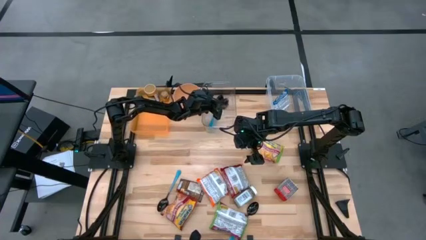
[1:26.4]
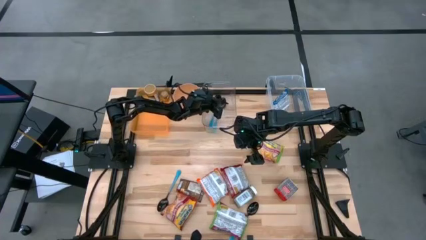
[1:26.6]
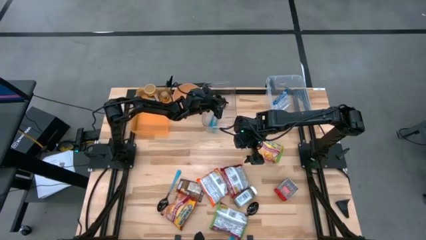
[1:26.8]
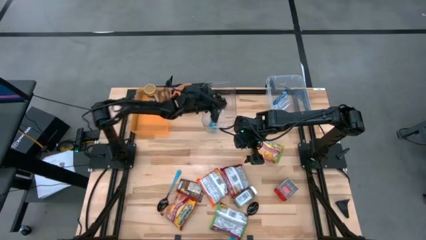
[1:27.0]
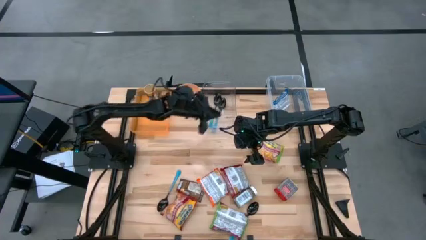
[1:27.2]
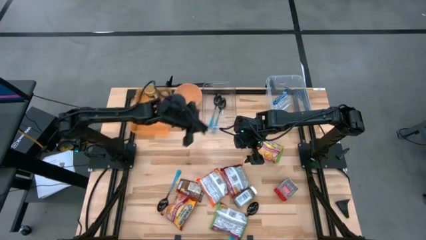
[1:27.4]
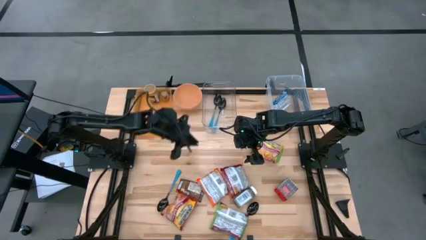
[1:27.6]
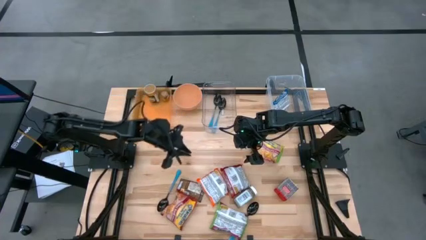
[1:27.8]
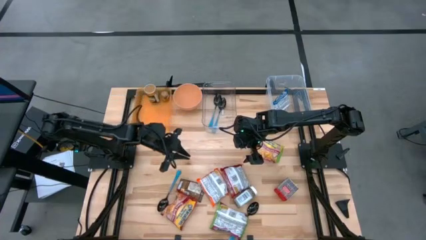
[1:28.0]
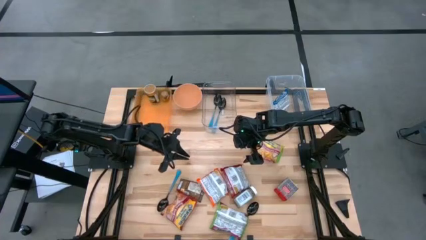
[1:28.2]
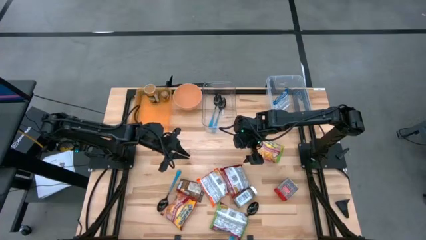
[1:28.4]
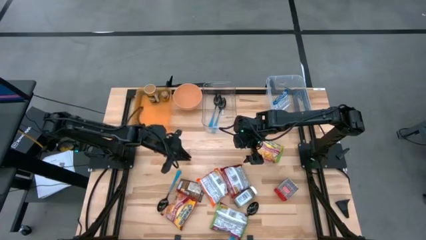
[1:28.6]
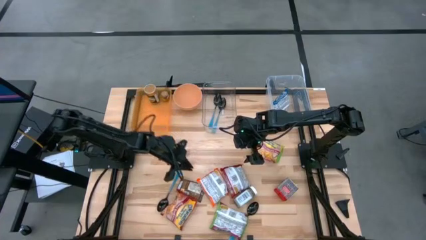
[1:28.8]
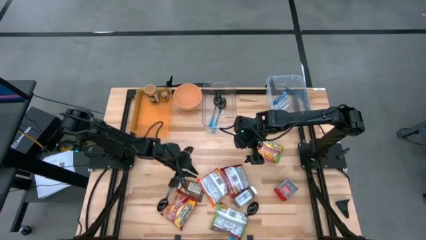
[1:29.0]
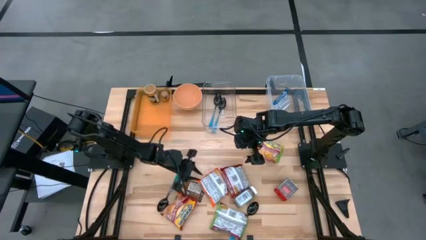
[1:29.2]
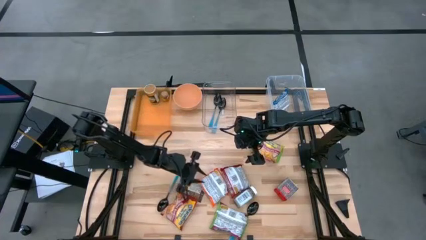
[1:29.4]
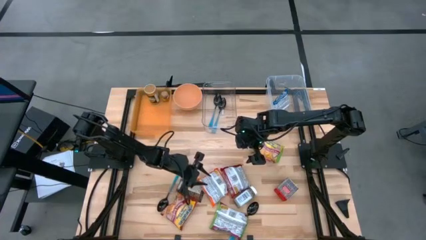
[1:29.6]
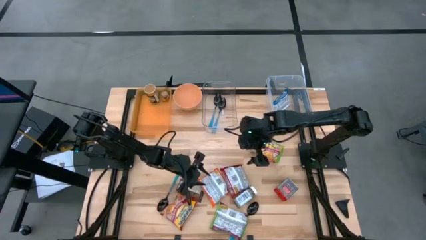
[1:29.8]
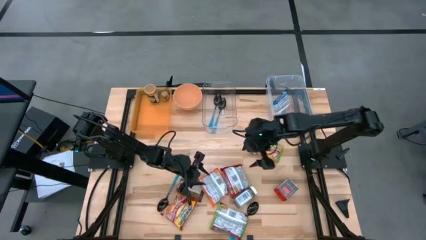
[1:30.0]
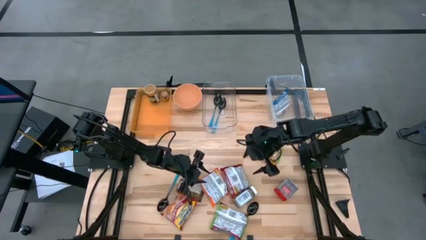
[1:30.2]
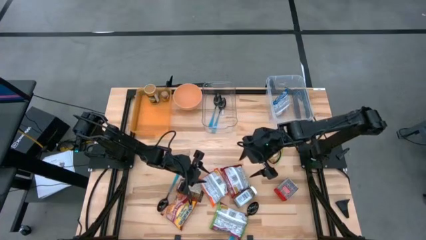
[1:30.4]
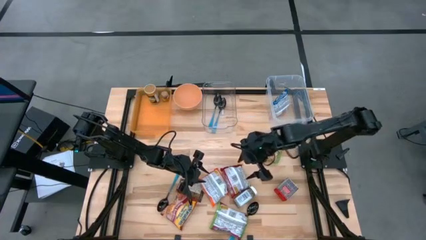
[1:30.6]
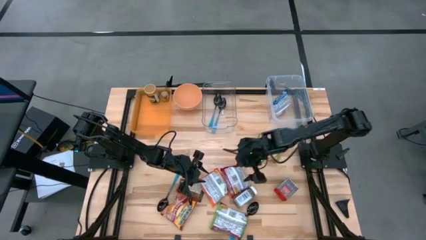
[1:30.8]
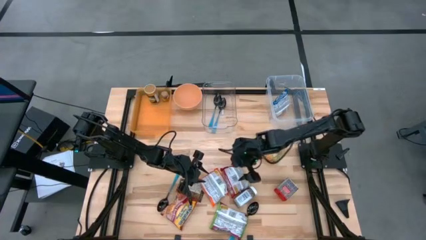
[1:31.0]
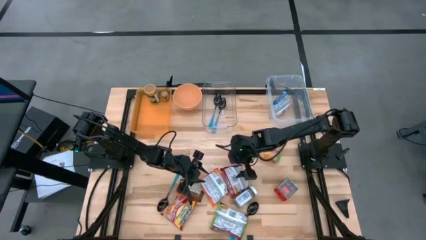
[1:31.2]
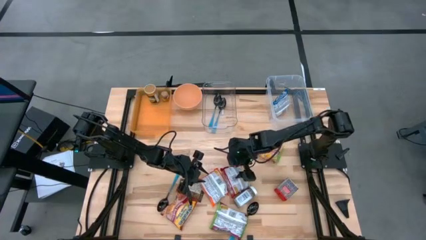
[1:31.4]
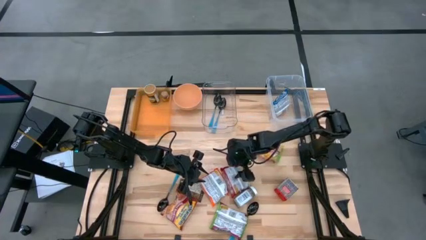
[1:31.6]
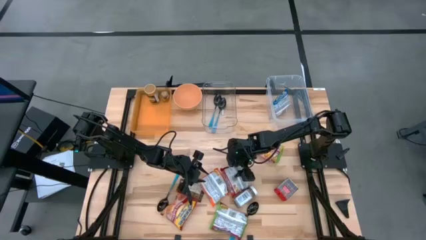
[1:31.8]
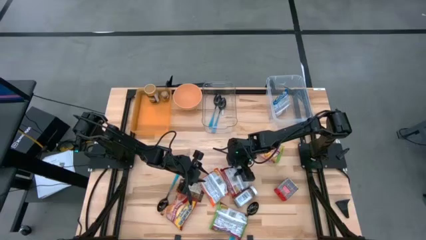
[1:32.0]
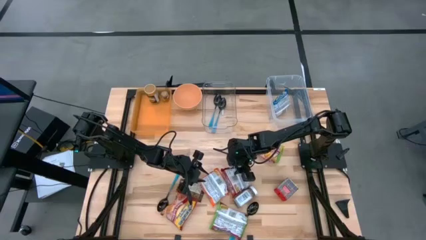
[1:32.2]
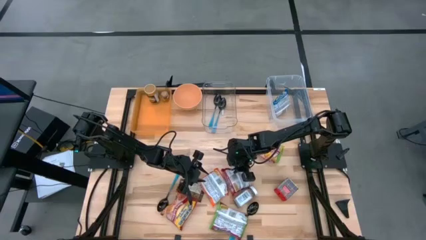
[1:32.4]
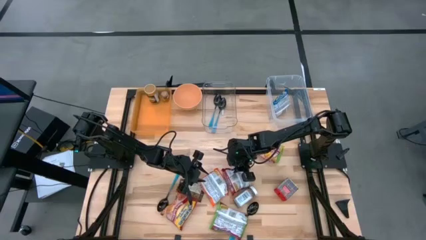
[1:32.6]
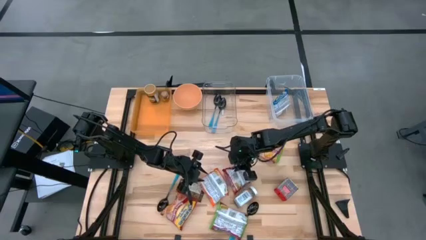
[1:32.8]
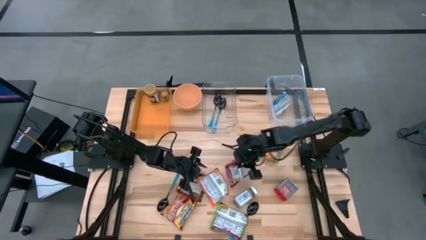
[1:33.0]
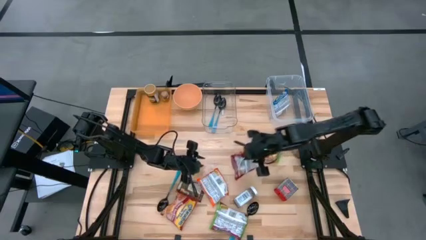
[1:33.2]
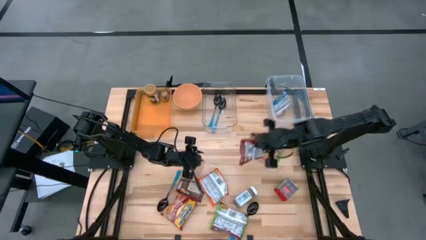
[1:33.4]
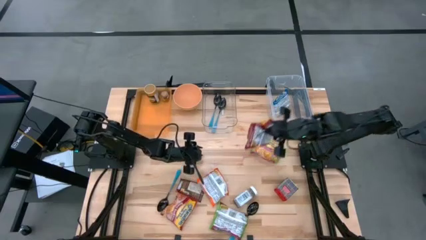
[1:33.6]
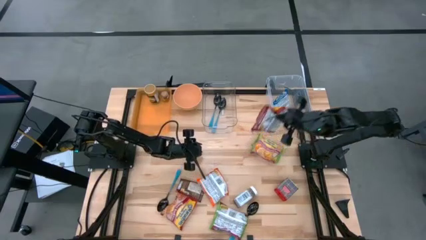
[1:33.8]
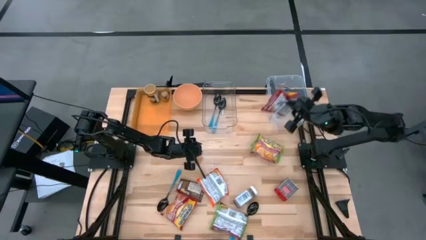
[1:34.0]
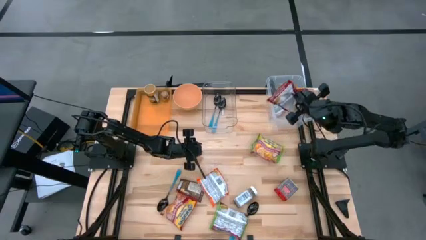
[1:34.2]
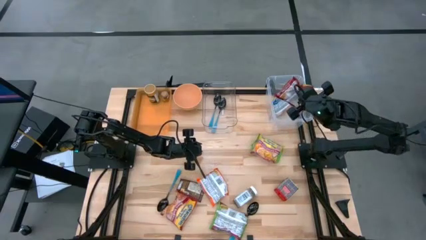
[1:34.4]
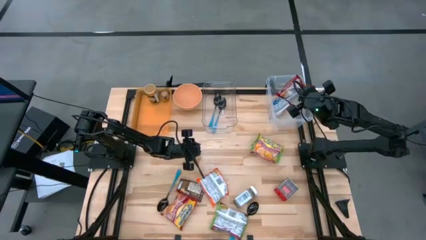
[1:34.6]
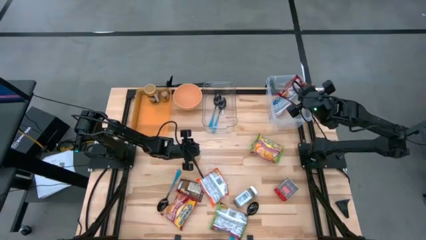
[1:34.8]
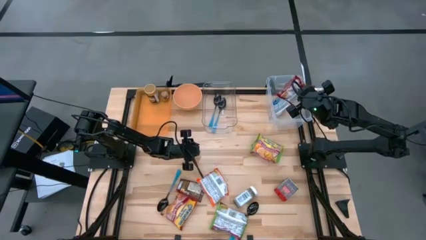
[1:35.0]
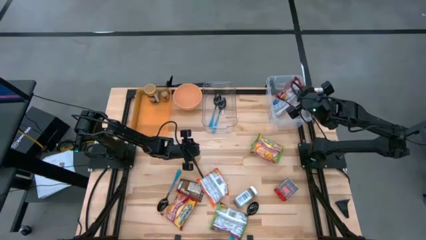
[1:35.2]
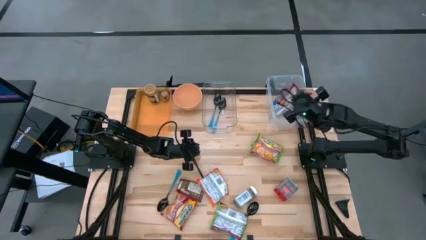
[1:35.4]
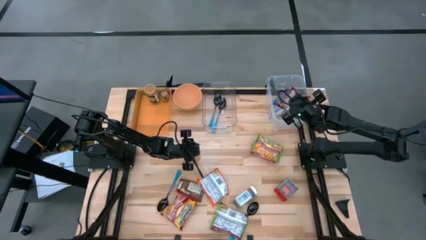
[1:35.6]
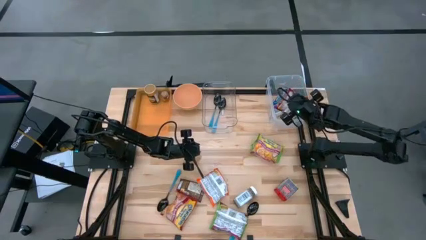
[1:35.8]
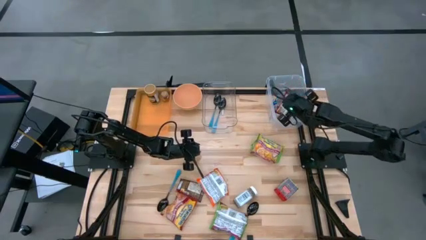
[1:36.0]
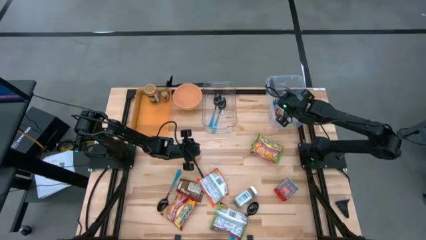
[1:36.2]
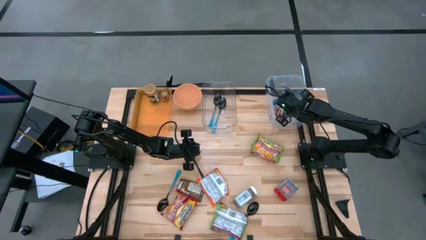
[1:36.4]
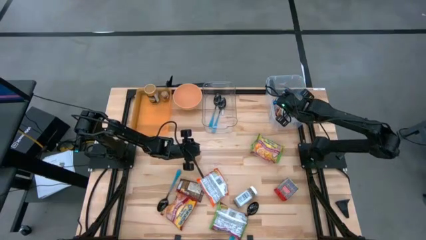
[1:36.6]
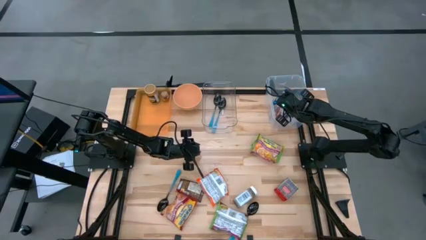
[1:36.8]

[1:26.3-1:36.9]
Task: Pick & Place Food Item
Put the red noodle pack into the transparent container

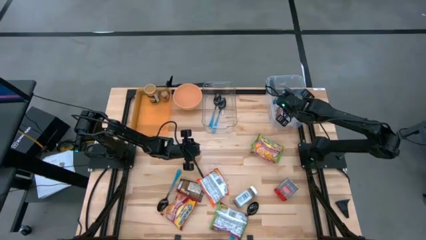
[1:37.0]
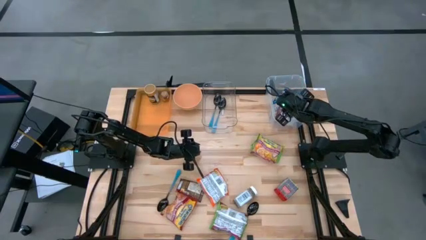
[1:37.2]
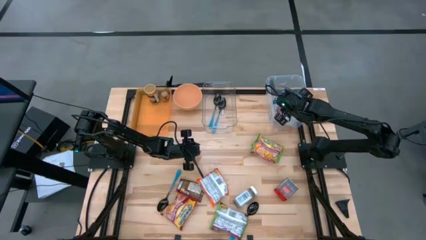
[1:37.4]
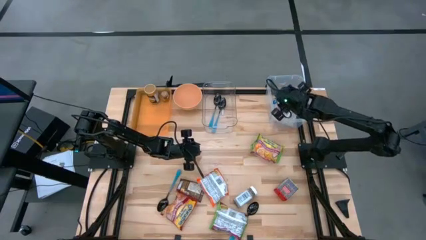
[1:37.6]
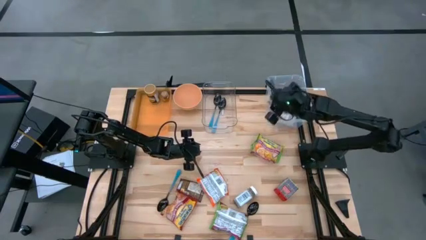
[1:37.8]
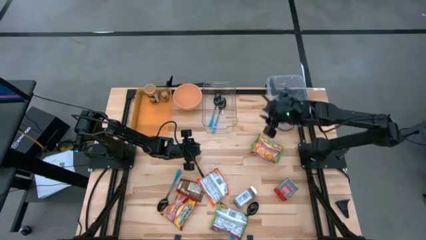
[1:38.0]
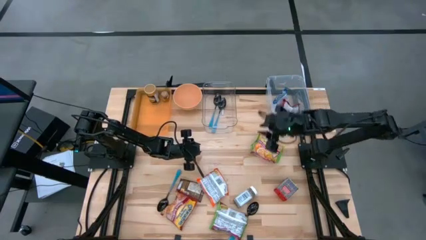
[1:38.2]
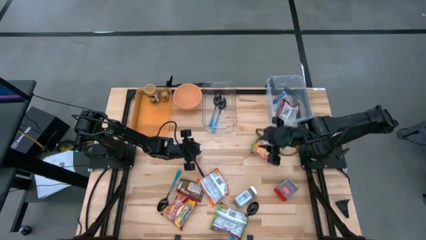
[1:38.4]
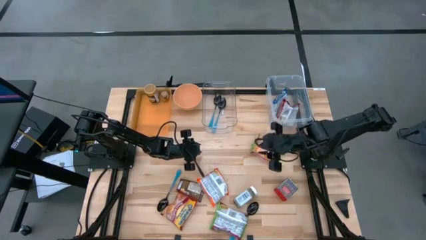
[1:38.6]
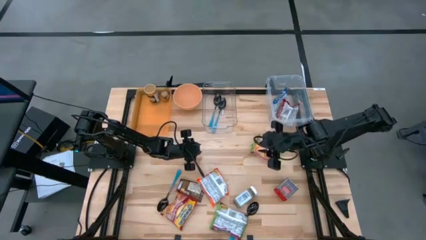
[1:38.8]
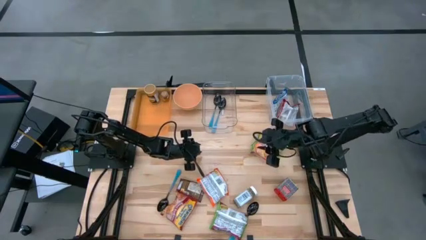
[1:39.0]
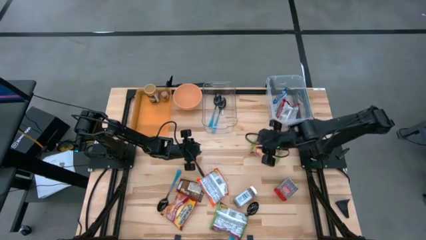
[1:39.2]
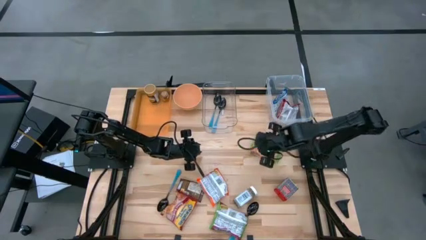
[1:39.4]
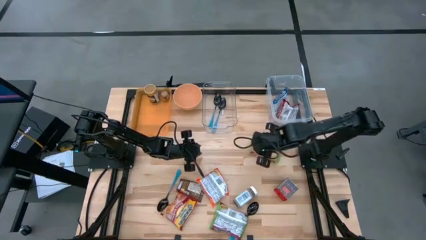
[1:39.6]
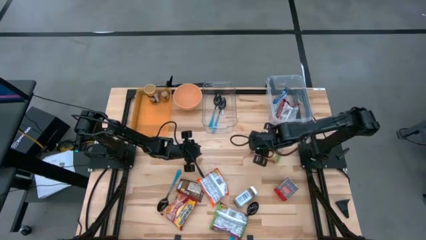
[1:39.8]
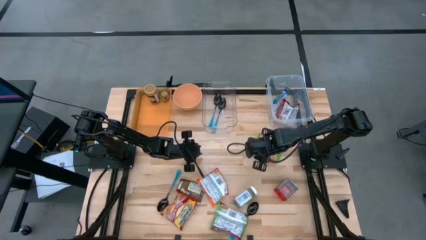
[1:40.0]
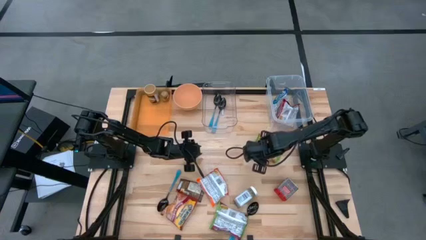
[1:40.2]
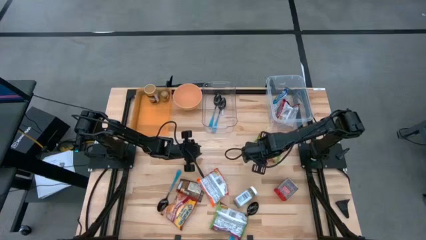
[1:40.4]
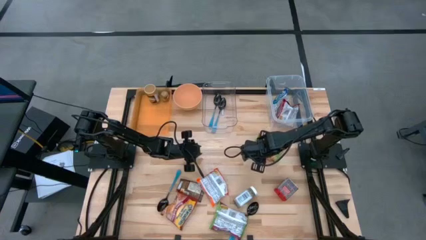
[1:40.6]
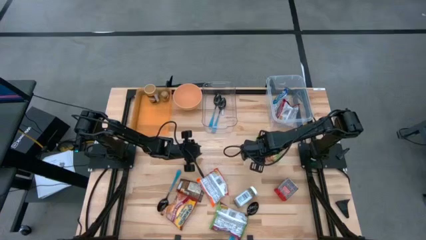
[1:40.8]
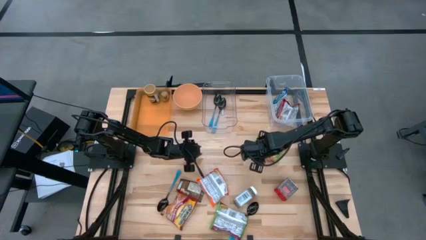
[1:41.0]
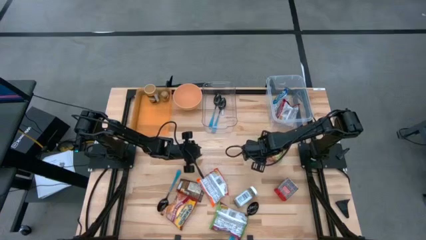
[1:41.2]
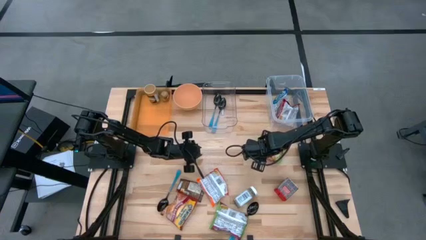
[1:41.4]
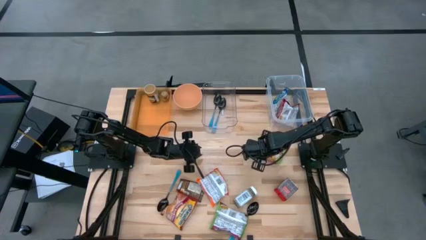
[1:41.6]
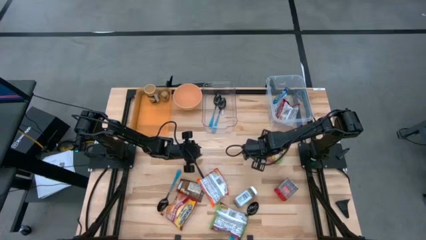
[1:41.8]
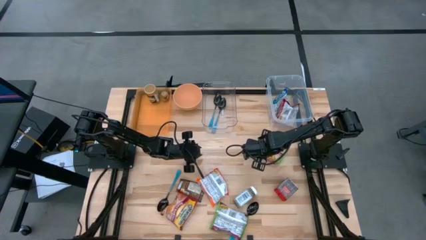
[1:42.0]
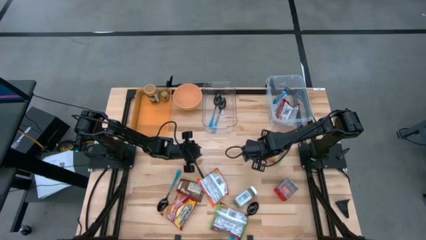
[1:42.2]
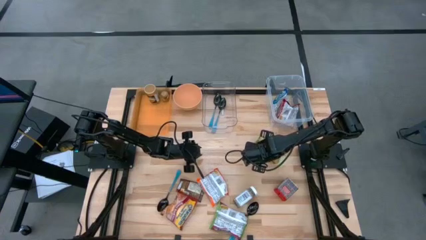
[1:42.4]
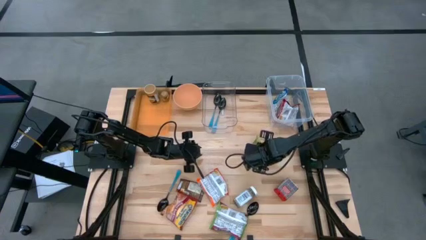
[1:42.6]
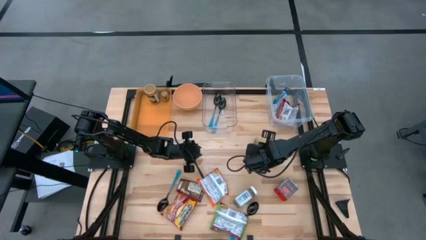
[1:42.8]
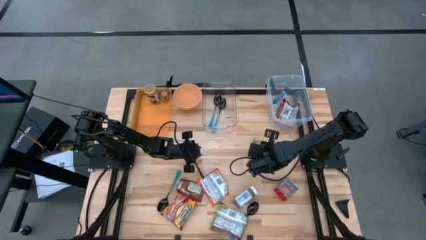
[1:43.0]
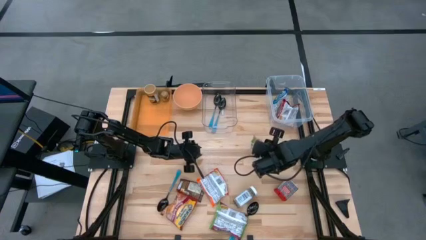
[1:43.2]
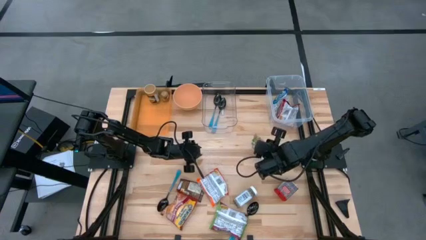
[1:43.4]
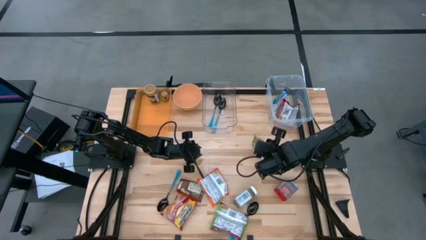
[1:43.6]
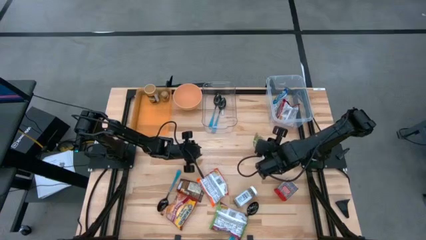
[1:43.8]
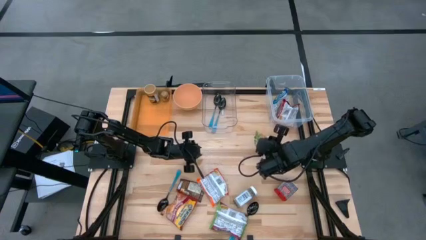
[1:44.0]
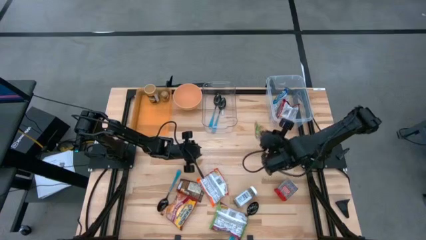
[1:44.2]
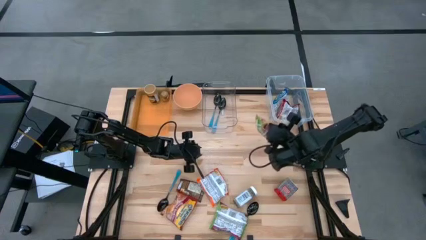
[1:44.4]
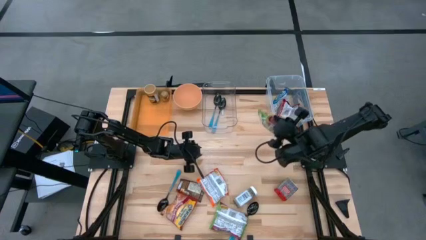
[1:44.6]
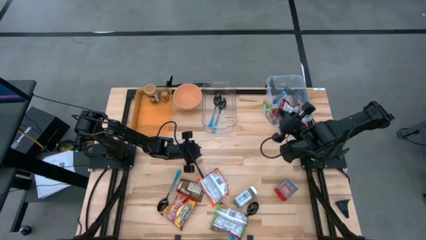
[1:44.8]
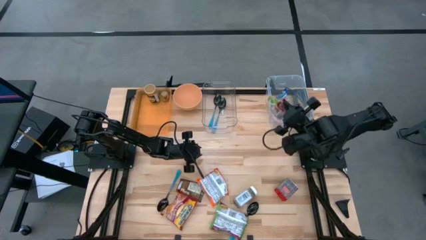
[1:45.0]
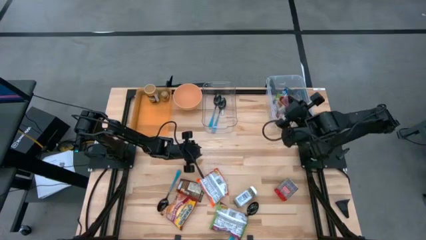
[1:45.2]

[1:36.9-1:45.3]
Put the green noodle pack into the transparent container
